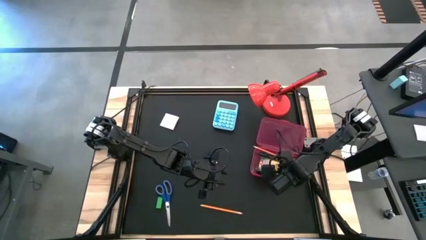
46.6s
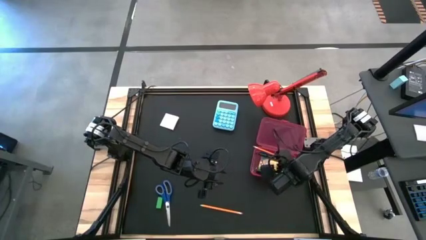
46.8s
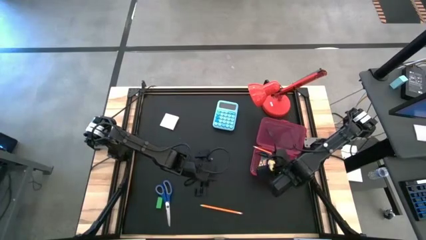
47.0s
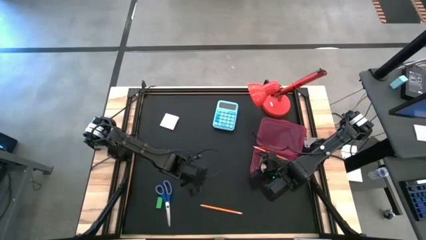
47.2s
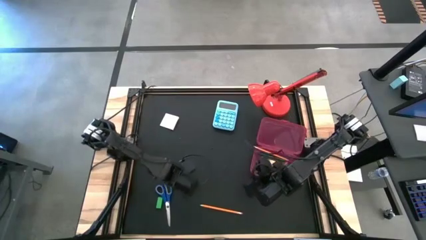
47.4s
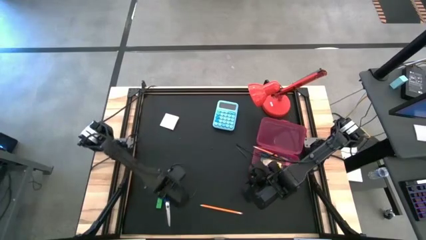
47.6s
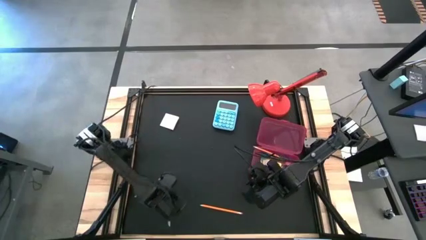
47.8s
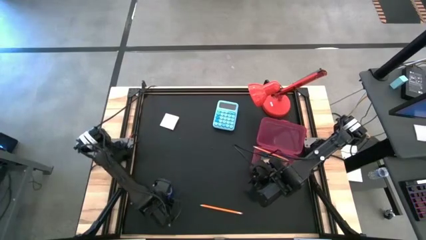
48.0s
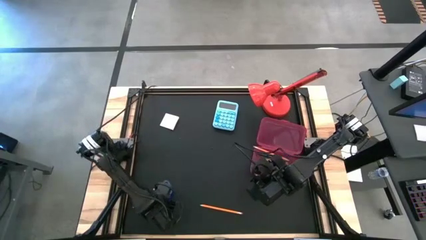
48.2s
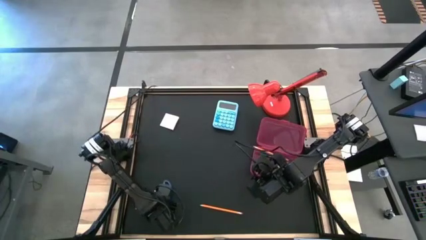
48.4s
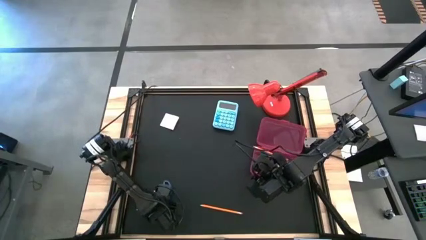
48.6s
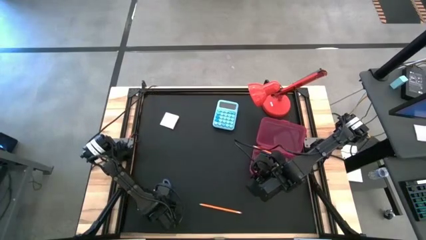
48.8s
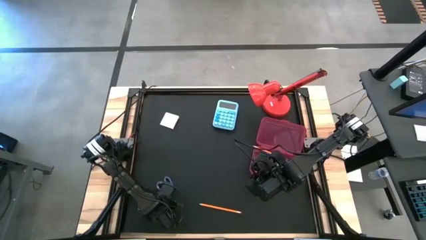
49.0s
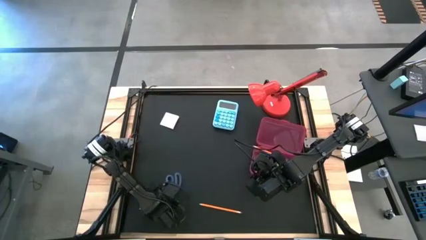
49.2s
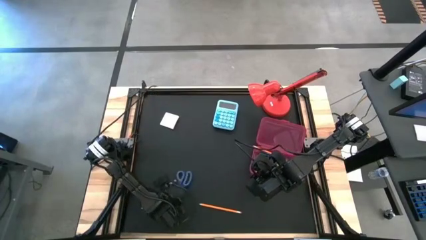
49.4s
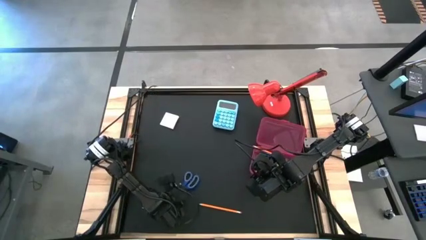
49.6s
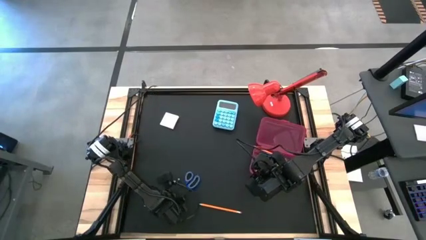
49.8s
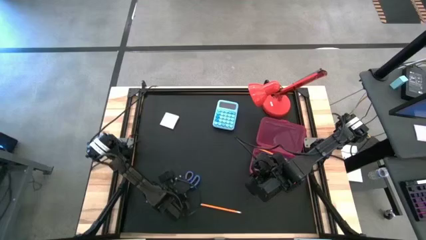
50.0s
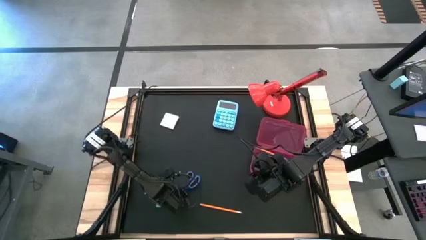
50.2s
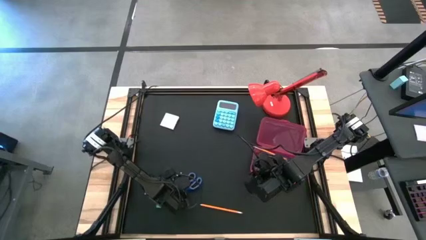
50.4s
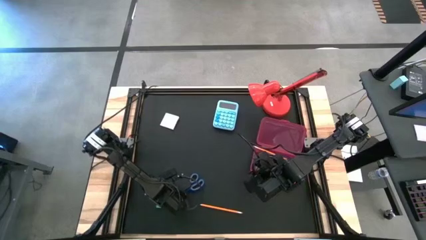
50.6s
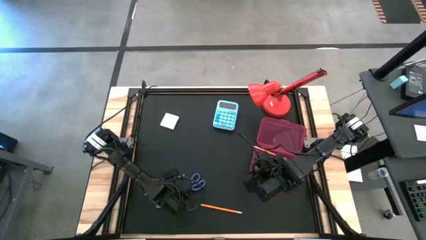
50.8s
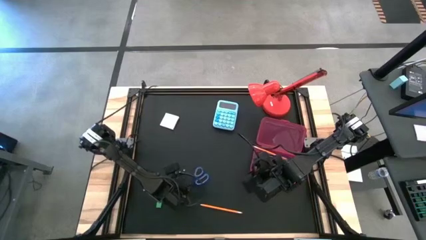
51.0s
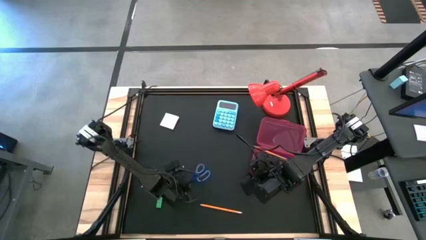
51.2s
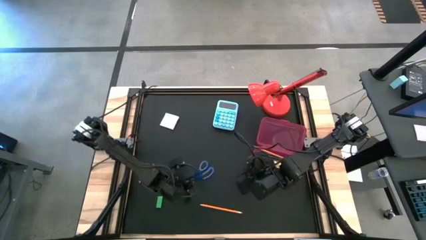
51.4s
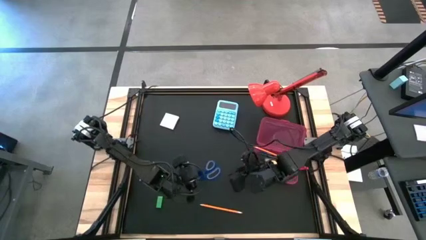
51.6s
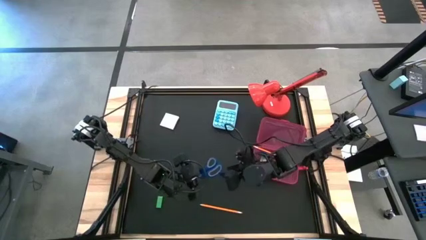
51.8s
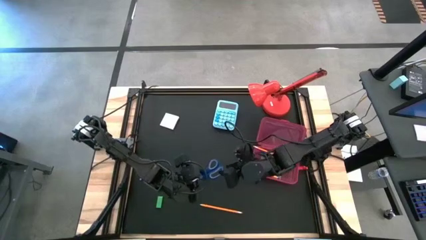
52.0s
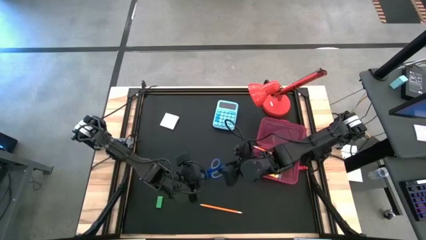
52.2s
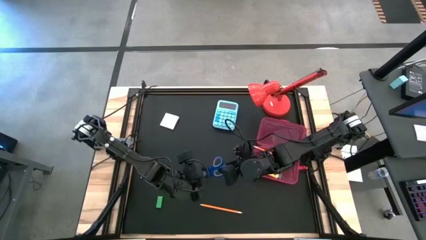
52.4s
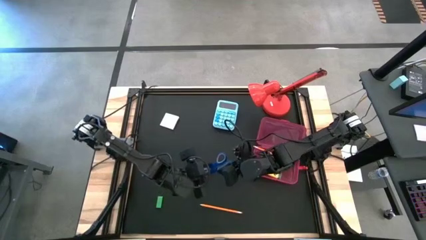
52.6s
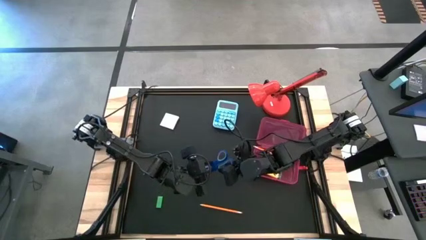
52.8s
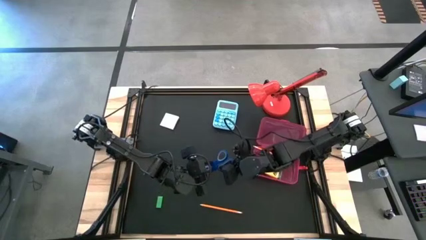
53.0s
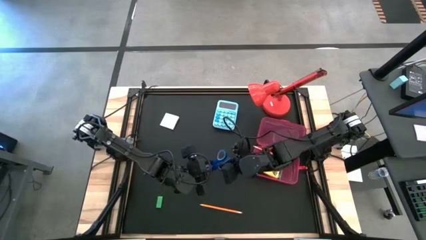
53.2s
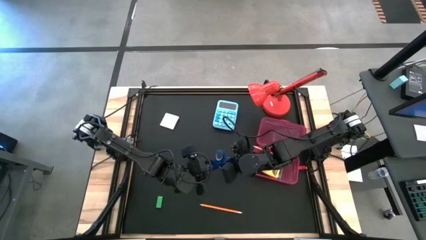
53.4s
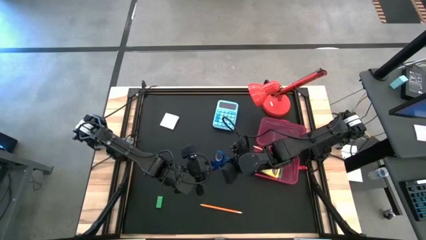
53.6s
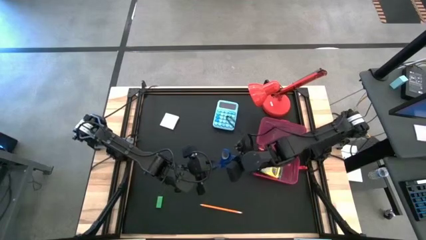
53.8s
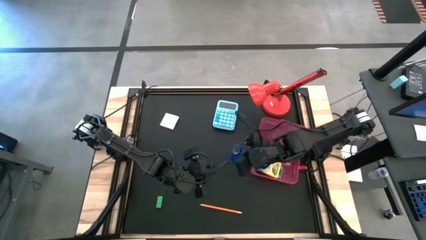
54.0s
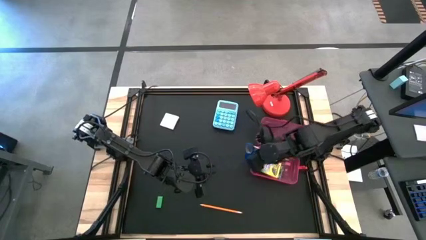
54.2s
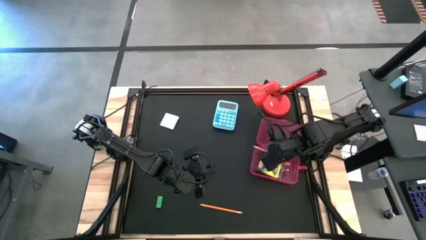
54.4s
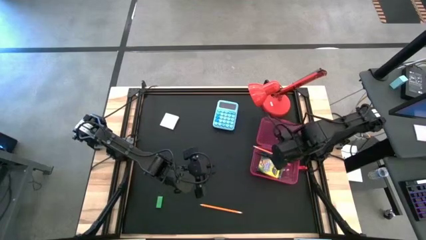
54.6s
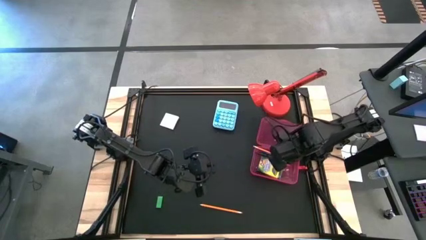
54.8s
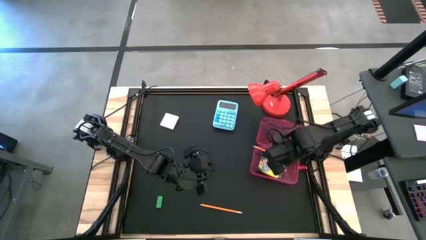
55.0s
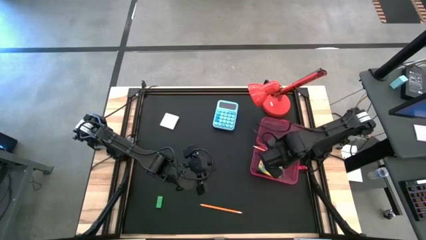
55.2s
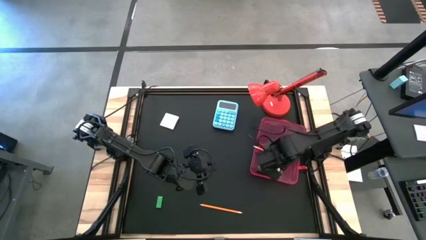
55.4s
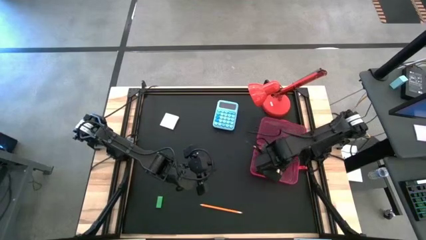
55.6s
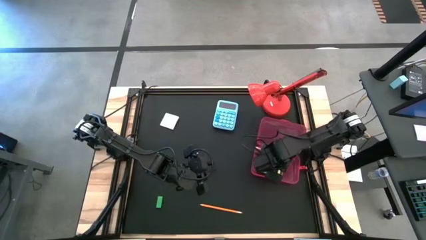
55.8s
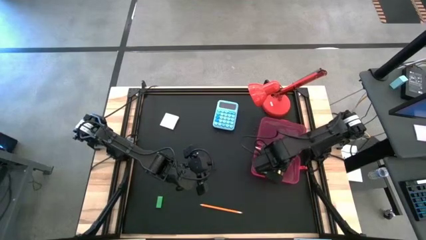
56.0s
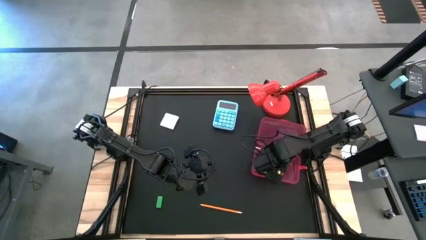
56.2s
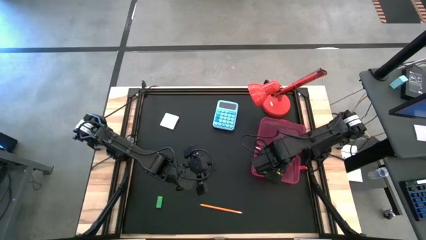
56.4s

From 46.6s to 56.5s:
Task: Pack school essentials
Put the blue scissors into the red supply box
